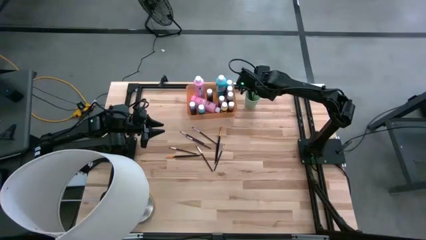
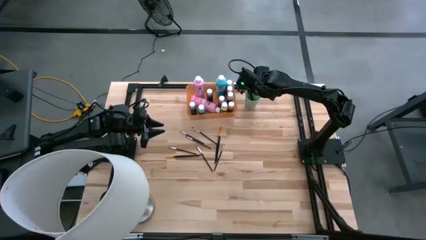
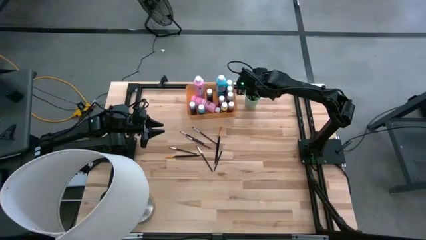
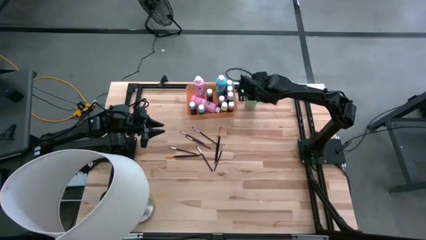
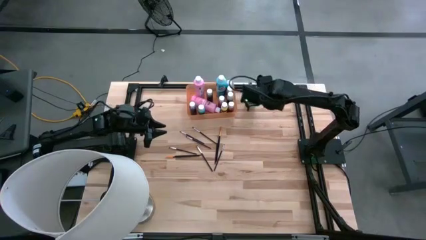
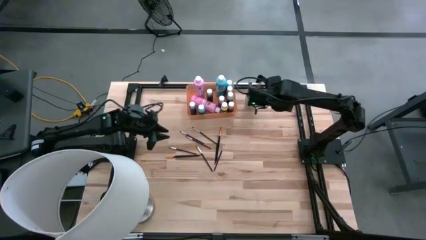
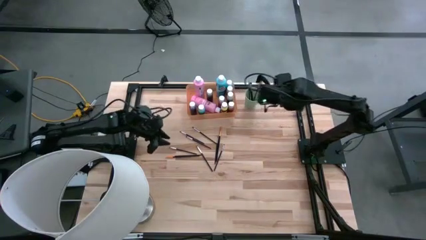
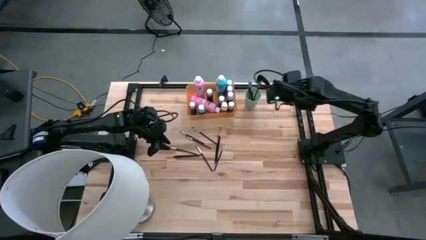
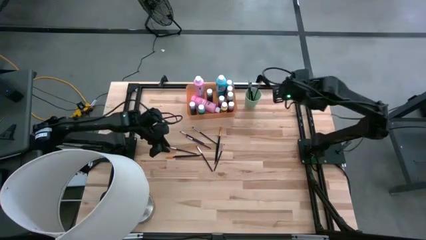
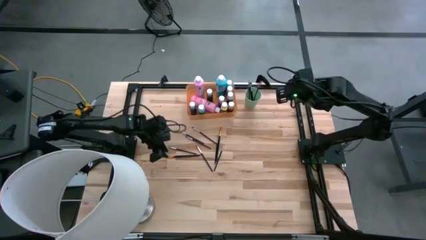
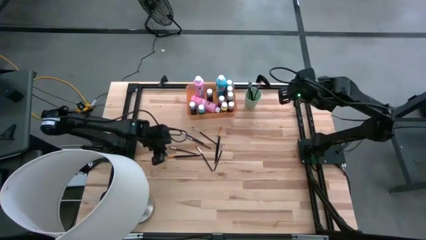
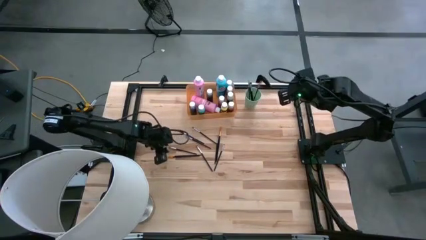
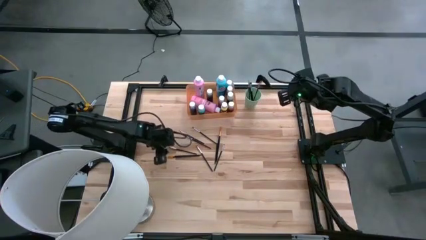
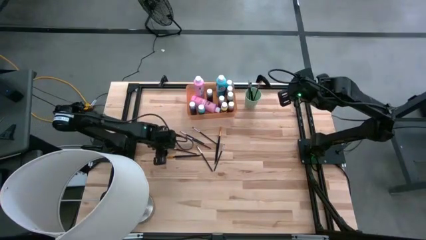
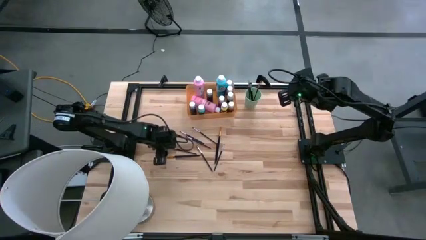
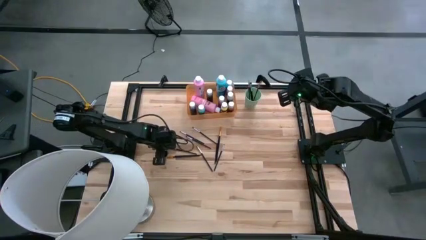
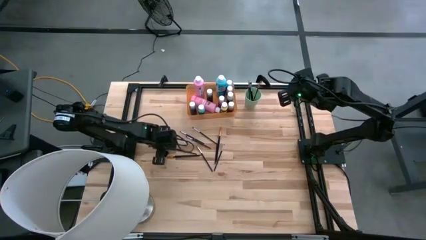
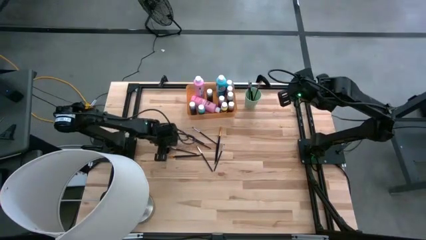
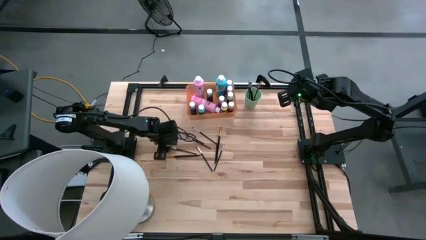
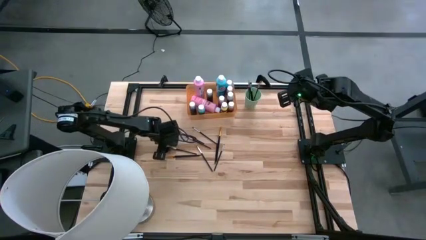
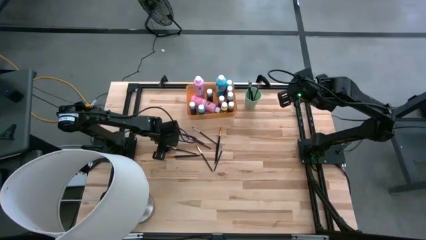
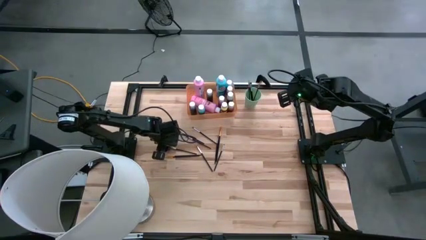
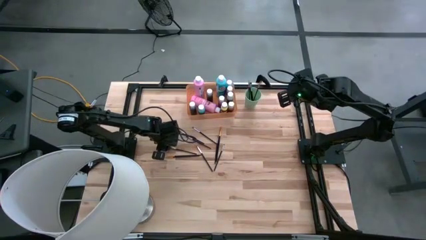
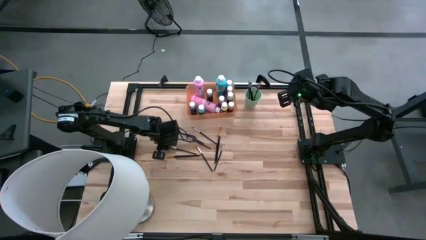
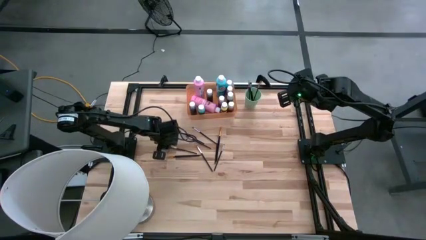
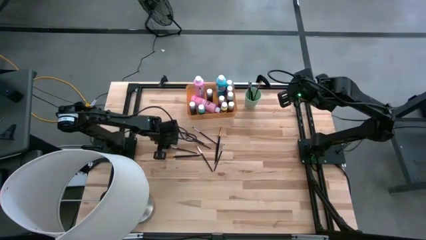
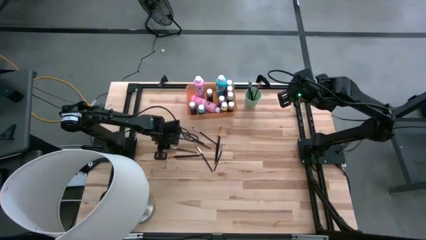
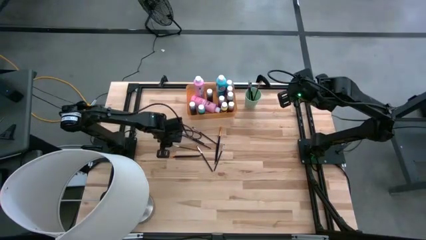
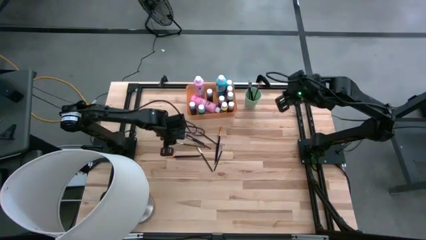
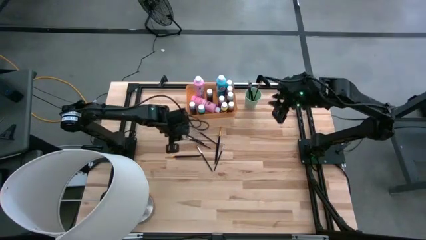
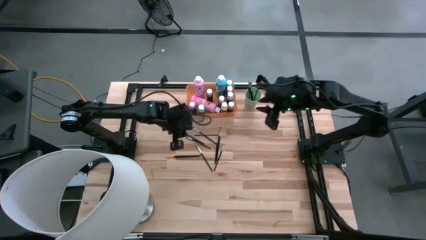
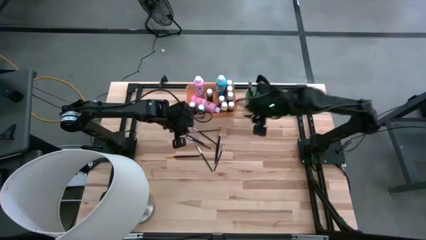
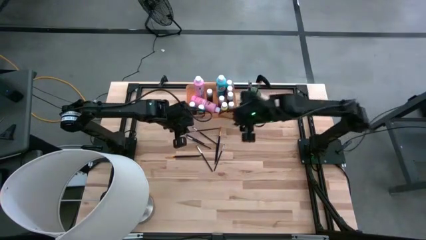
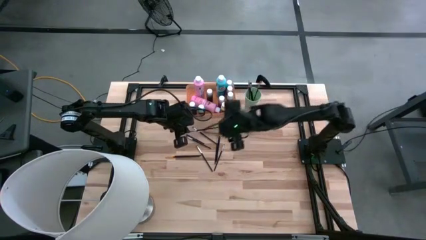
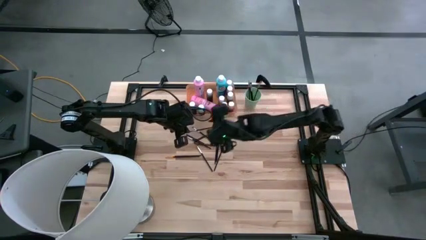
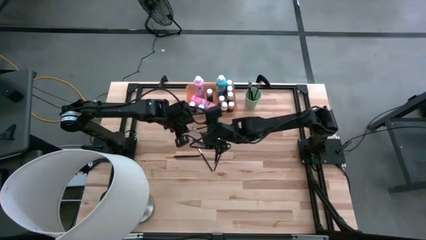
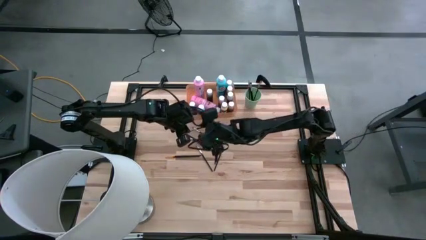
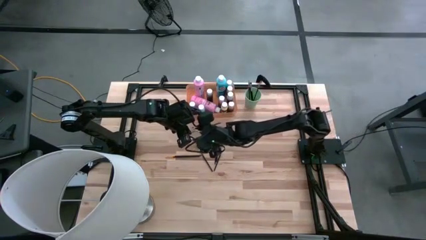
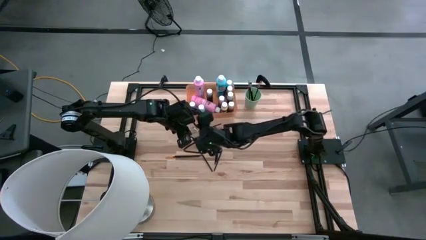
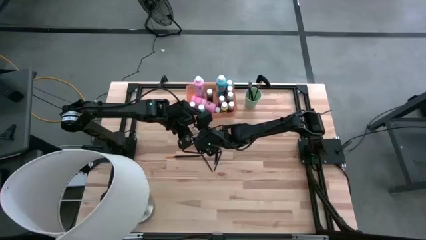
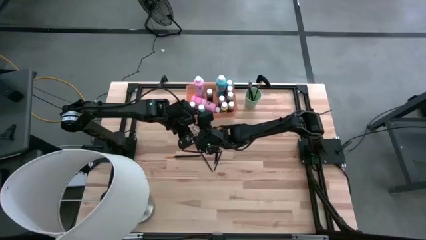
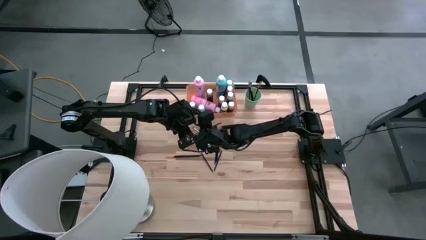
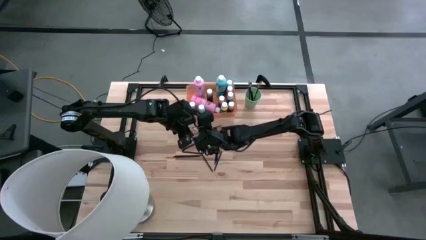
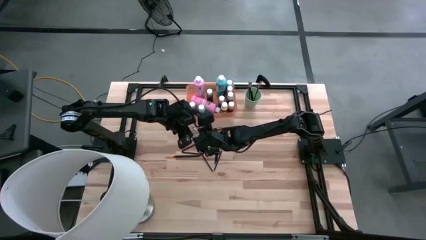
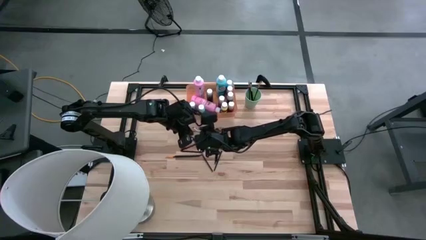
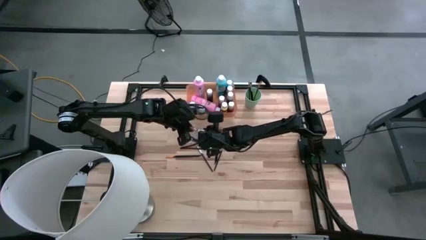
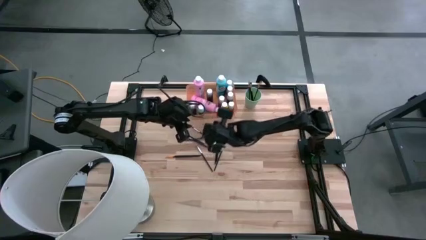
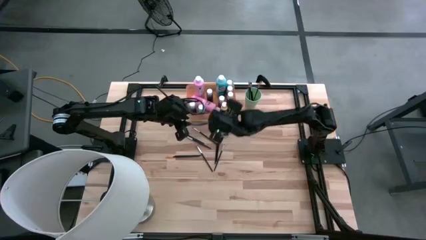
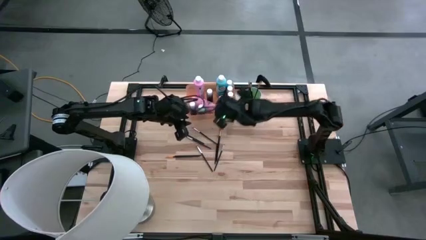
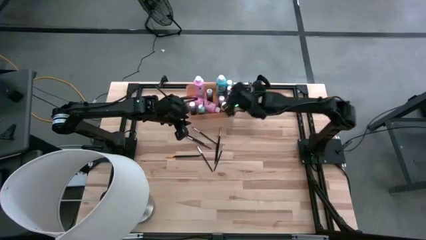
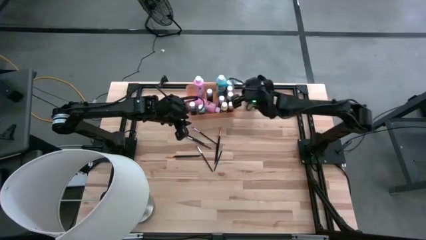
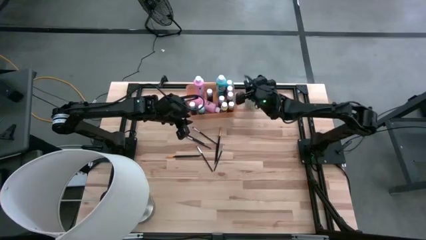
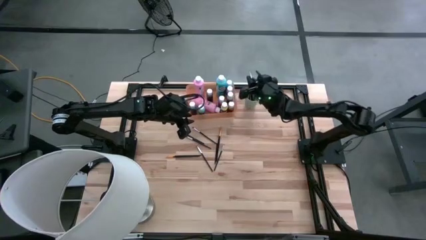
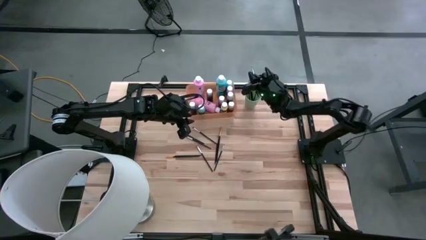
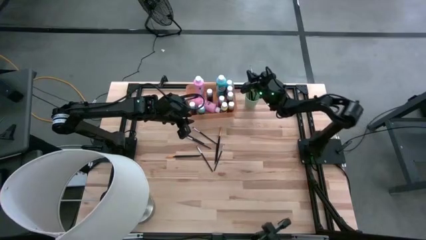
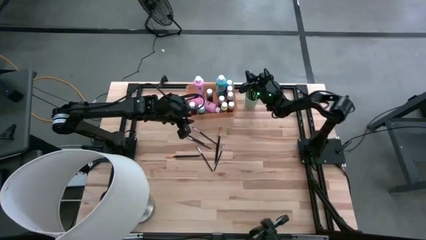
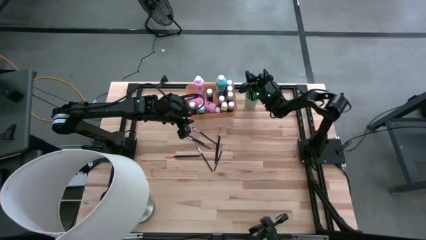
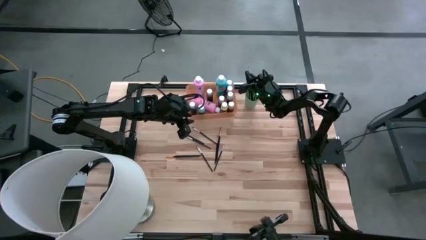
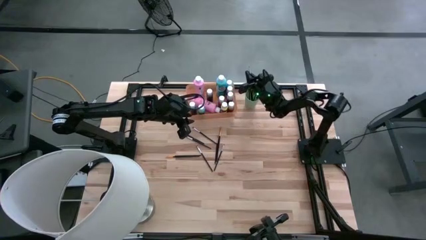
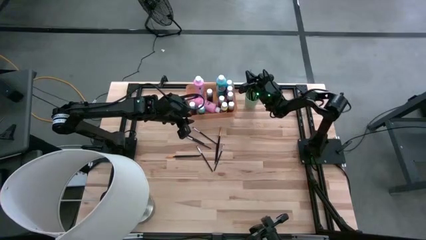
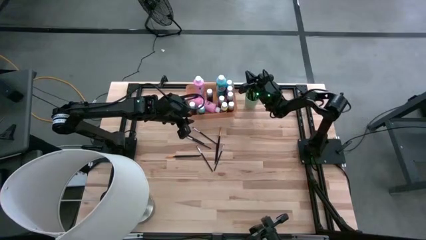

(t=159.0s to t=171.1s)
Task: Pick & Place Paint Supplies
Put the silver paint brush into the green cup
